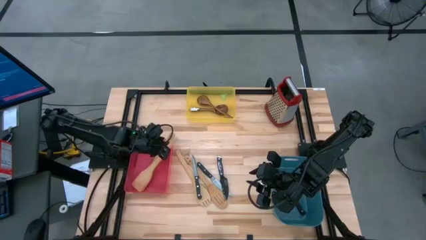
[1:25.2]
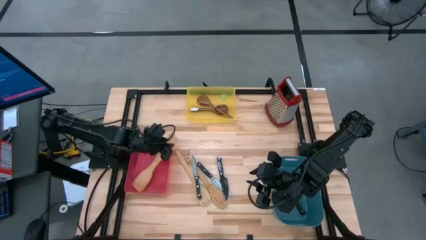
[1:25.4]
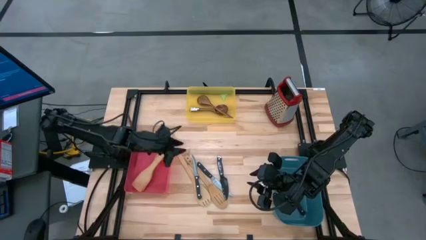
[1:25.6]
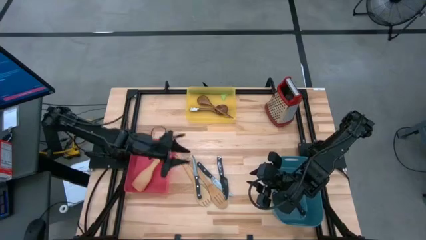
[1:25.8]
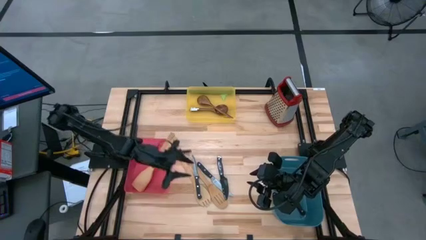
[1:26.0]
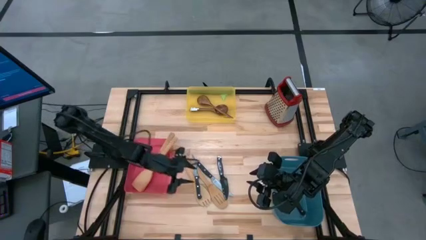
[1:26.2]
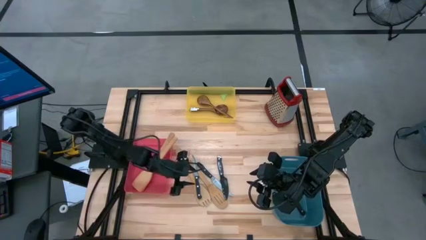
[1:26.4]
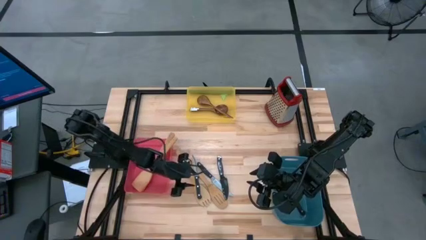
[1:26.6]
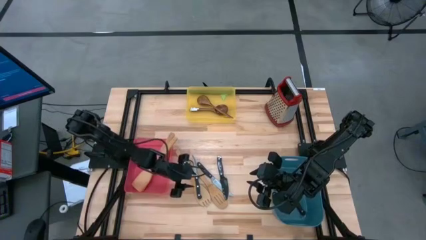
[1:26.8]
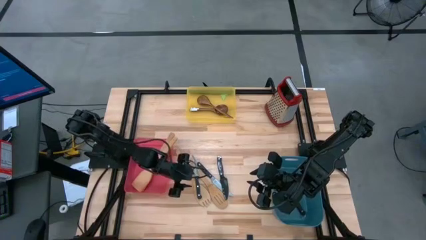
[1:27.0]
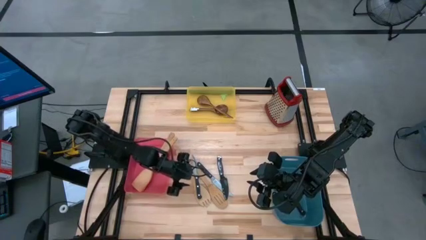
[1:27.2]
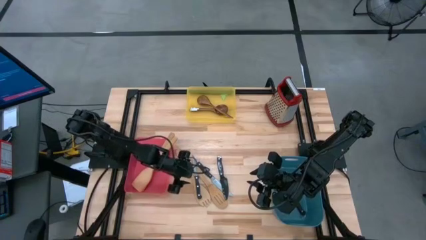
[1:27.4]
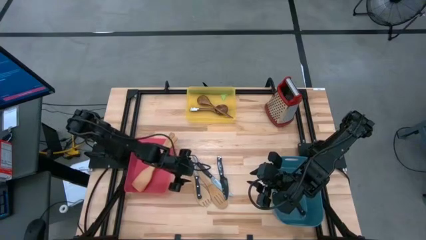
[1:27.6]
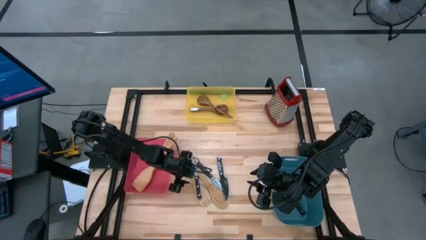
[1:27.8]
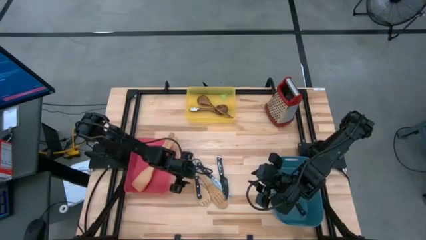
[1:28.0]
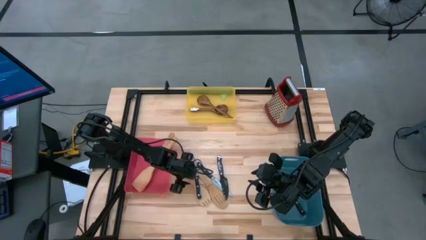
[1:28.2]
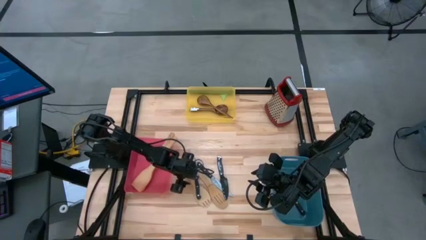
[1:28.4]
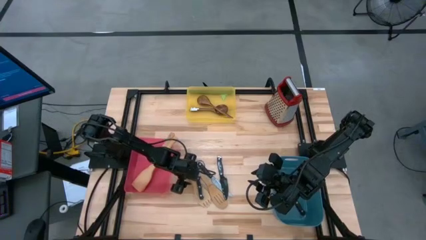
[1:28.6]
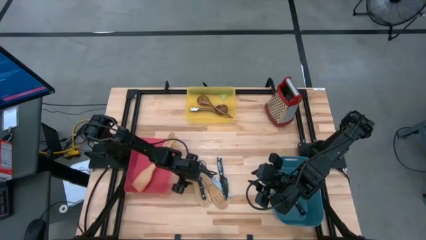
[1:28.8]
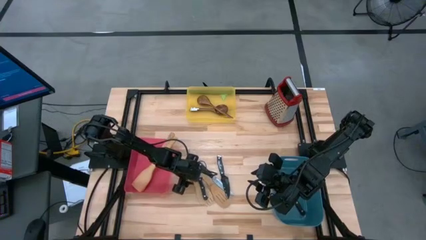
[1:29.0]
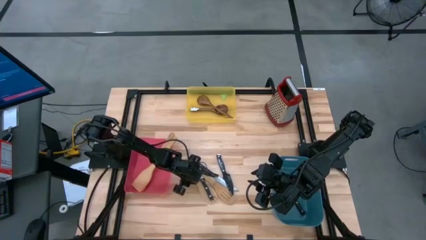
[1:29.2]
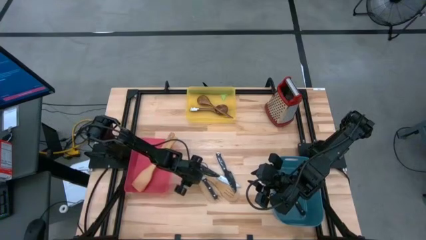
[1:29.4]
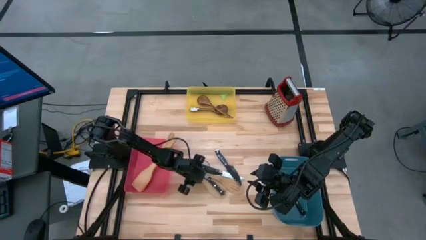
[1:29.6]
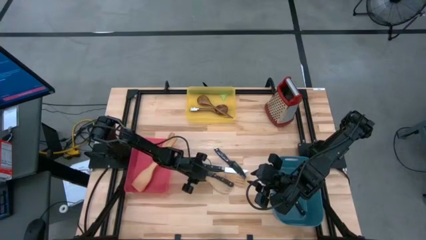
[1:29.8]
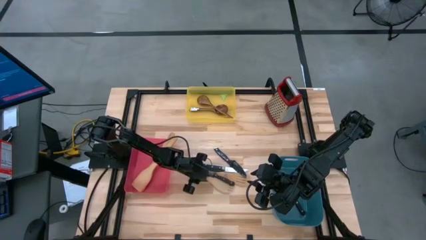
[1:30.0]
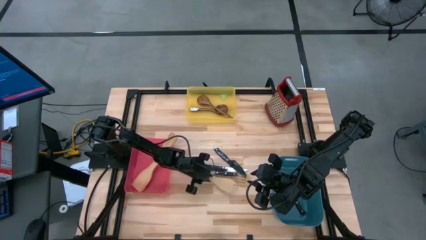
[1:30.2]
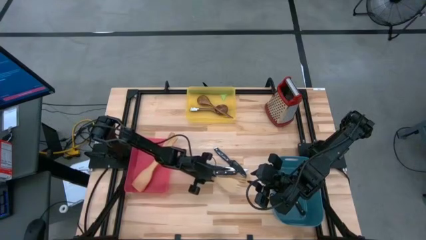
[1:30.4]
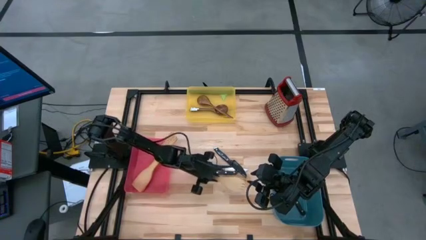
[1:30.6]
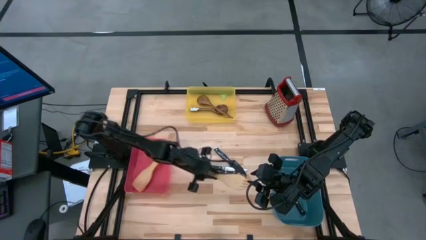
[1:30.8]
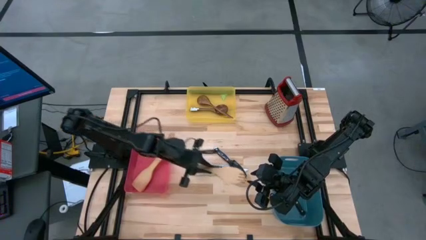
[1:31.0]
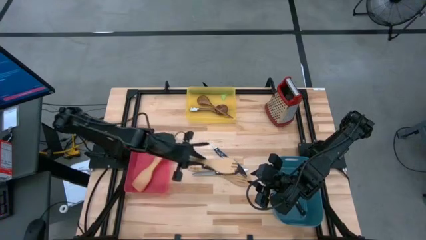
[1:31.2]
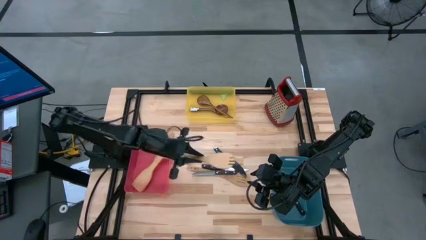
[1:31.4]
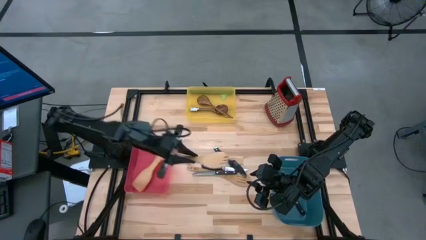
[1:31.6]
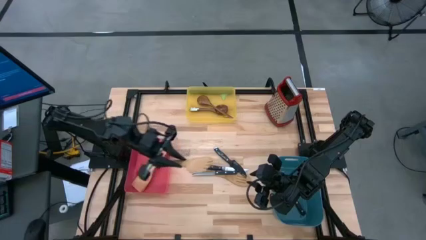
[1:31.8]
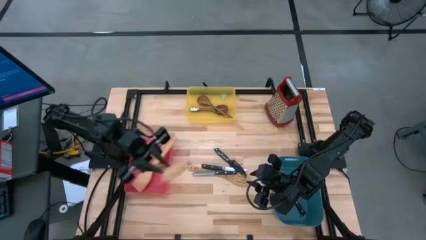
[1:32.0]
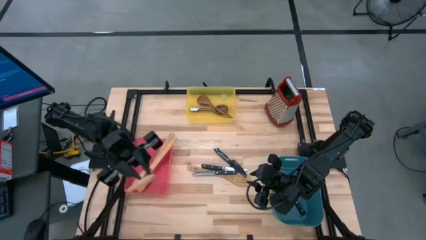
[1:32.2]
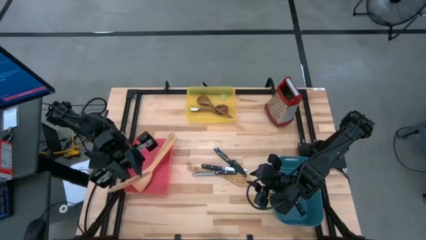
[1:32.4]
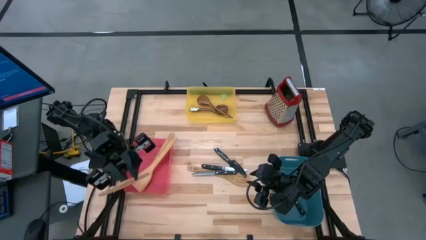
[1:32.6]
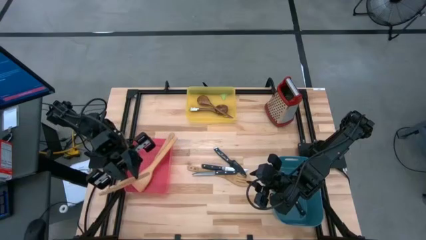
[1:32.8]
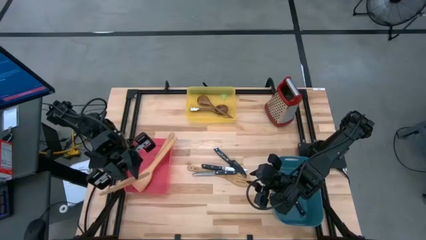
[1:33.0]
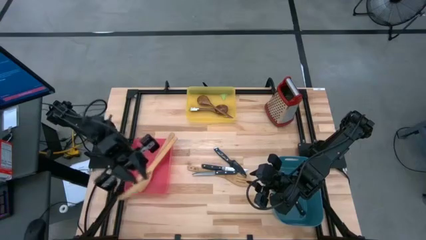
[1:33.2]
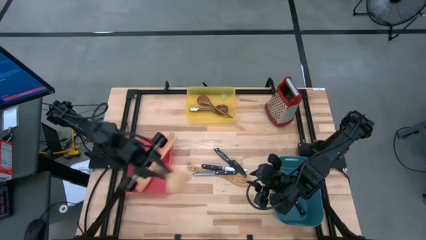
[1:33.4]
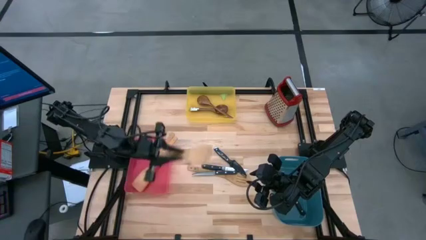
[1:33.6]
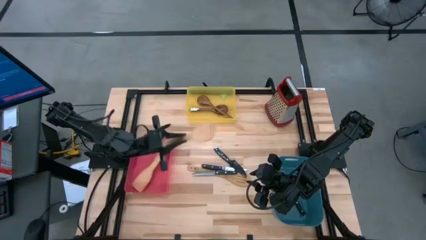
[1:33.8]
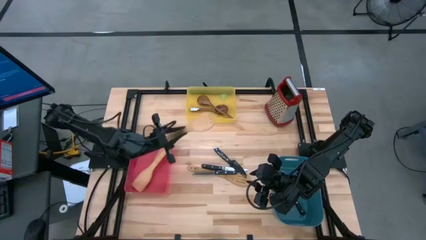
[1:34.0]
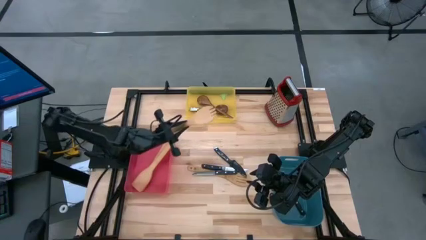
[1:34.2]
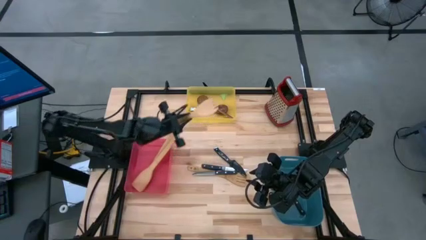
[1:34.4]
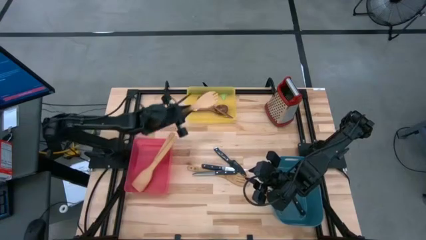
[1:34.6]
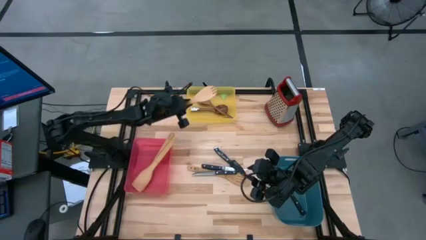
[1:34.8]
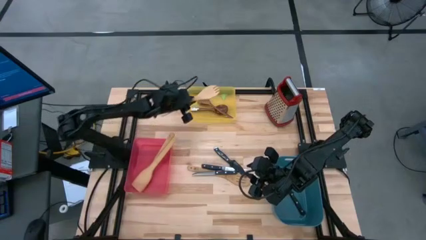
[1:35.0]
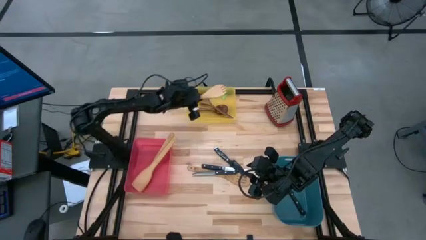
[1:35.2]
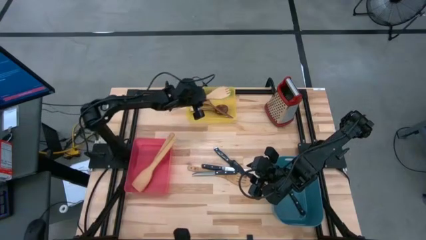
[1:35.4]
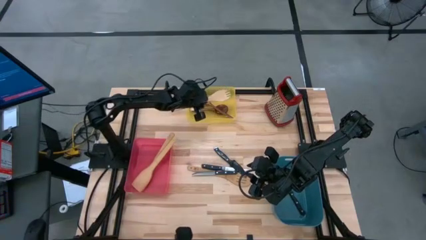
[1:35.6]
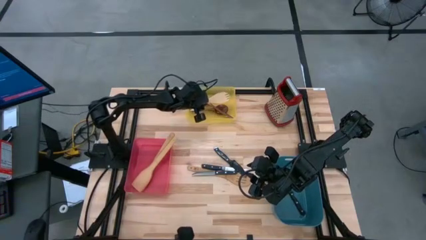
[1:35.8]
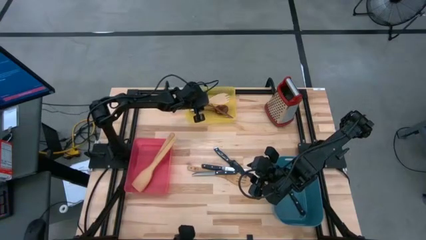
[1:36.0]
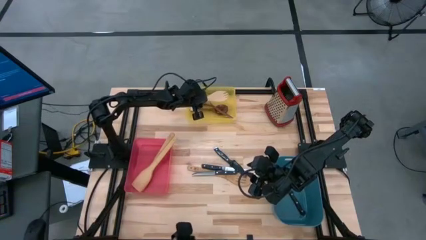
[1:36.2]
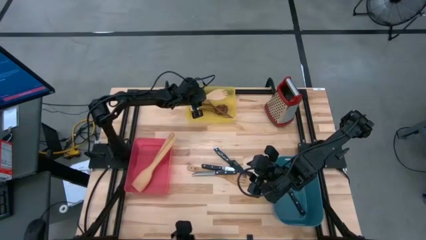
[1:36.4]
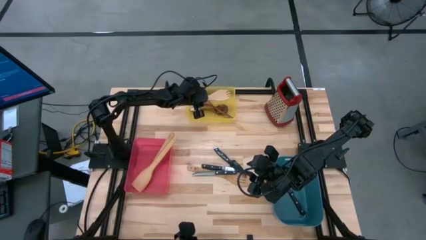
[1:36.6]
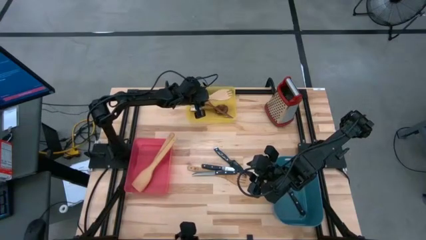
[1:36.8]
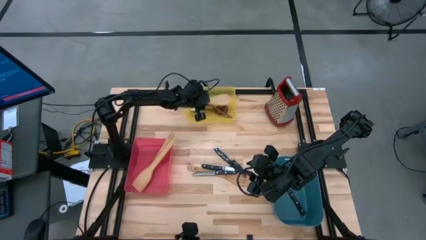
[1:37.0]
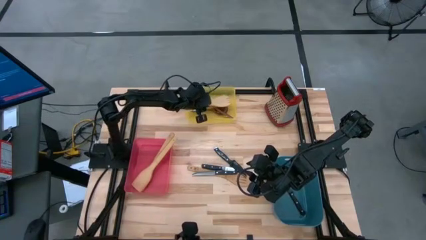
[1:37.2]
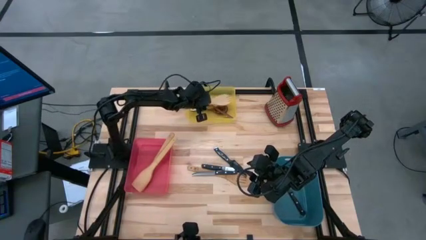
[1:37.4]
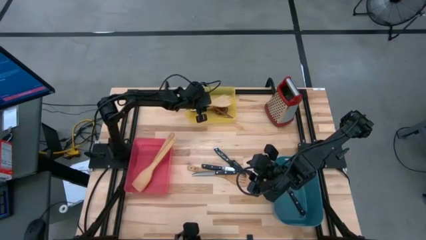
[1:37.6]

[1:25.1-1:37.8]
Task: Pick & Place Kitchen Items
Put the brown serving spoon into the yellow bin

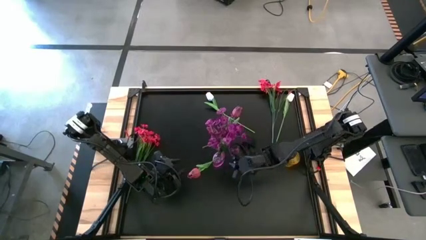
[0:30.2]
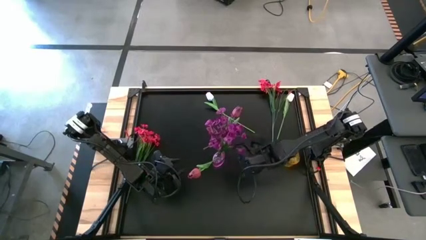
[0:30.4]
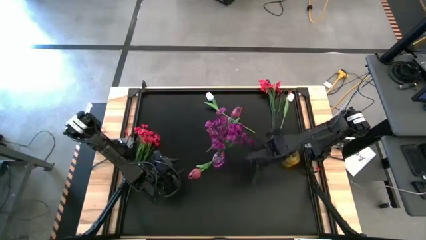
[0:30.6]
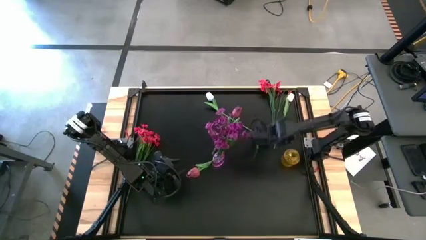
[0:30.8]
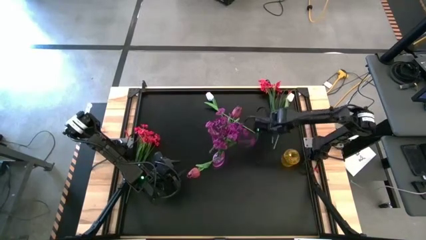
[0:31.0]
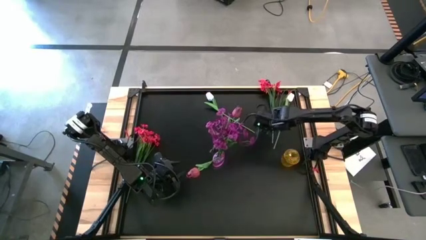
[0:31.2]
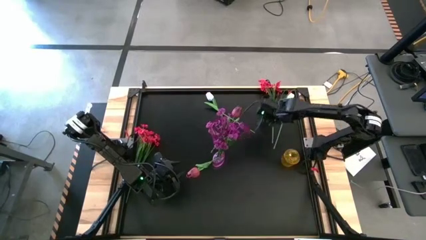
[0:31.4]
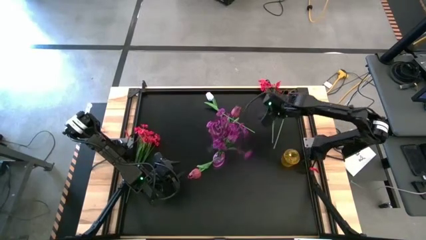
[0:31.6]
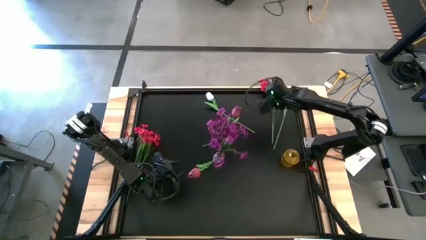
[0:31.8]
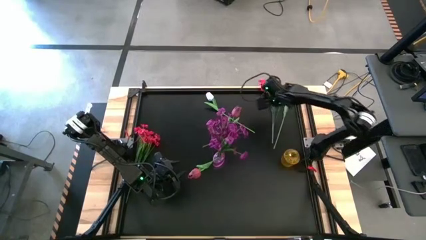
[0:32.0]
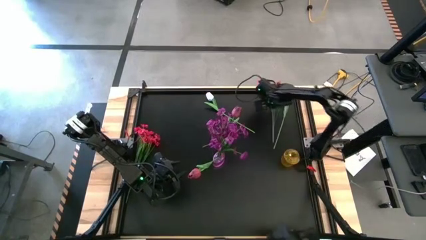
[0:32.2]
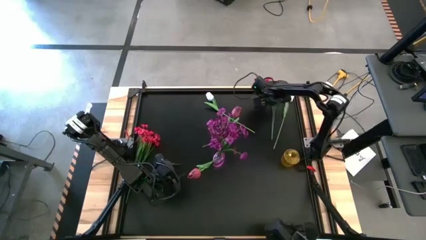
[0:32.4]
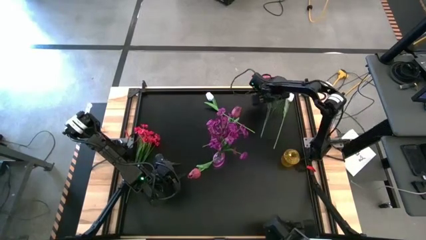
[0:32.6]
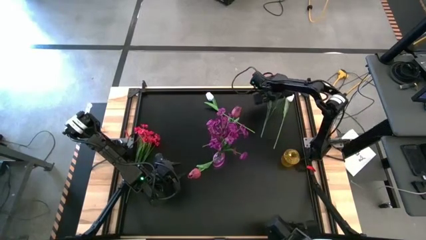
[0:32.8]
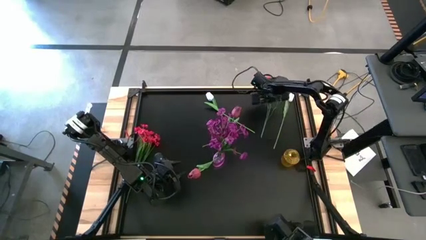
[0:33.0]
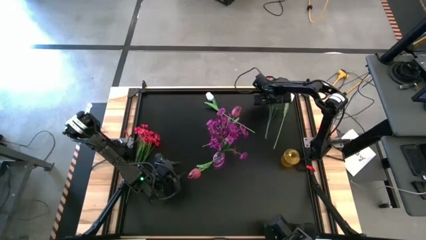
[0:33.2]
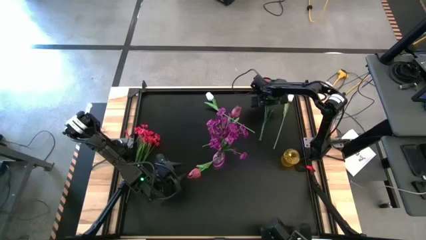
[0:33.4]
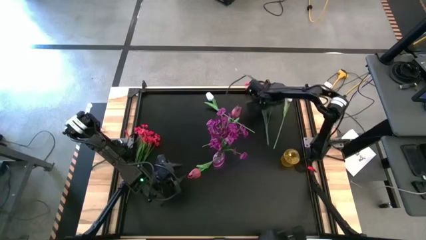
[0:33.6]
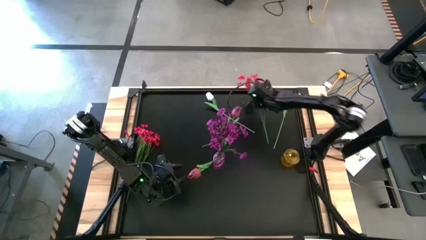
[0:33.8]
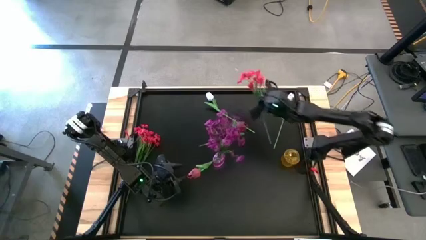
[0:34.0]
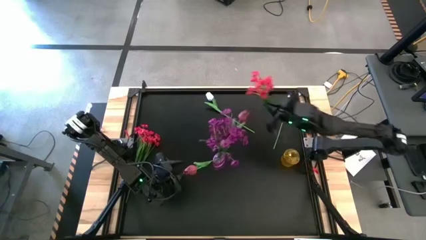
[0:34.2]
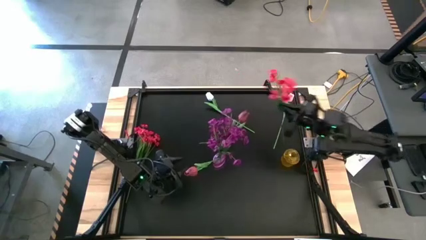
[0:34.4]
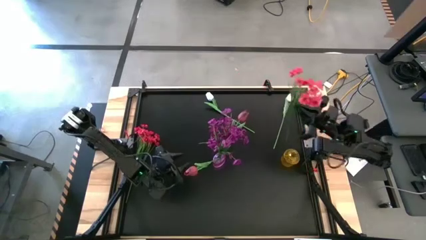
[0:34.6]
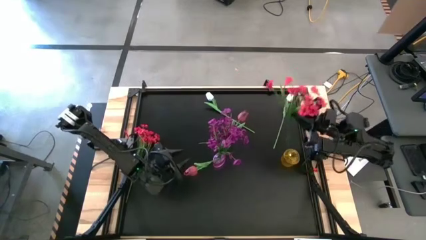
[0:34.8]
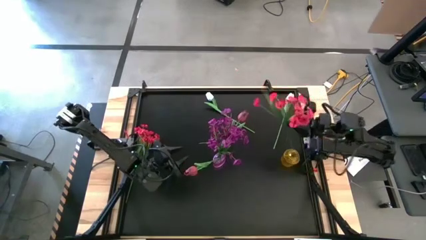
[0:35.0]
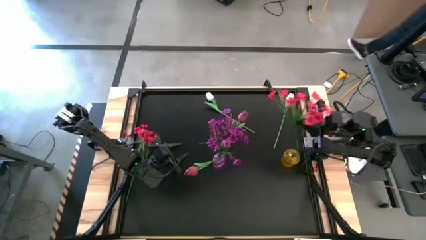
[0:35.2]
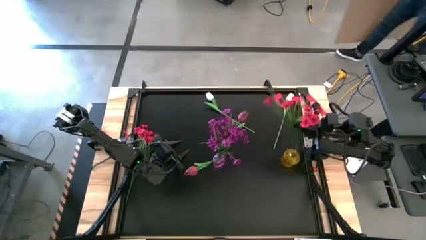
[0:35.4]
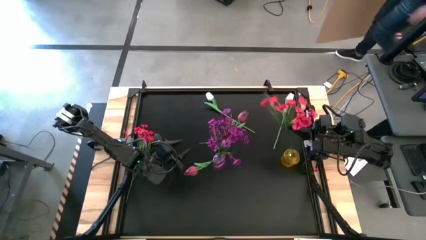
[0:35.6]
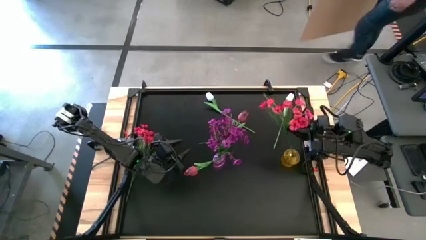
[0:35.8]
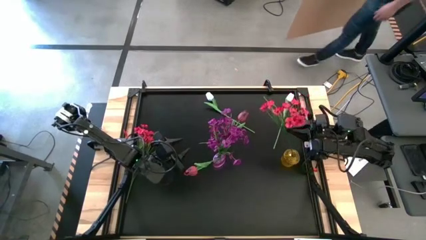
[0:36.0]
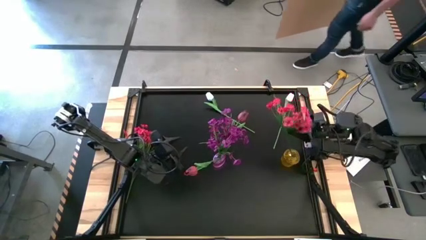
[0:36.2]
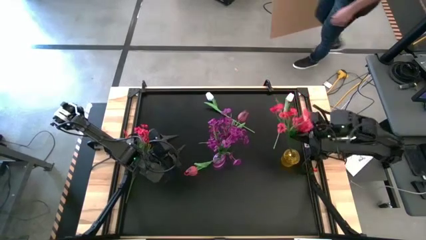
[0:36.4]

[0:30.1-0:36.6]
Task: Sort flowers into vase by color
Put the top right red flowers into the yellow vase
